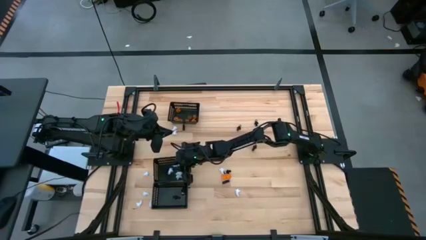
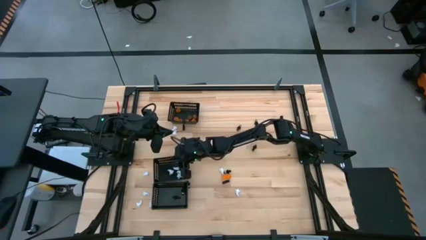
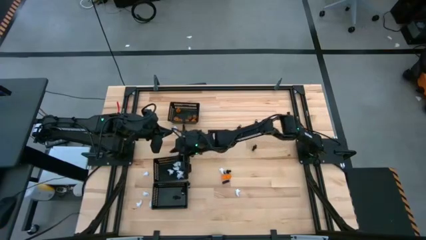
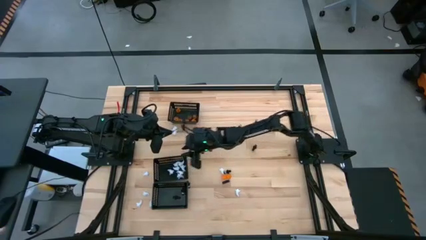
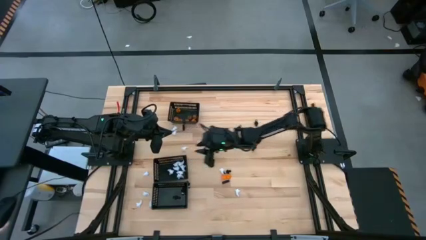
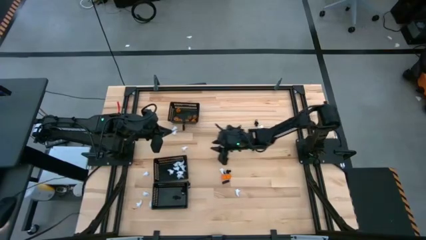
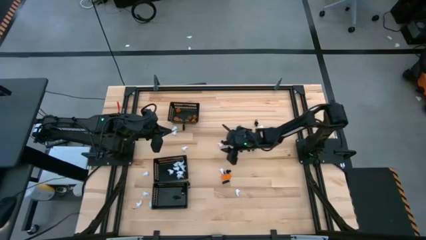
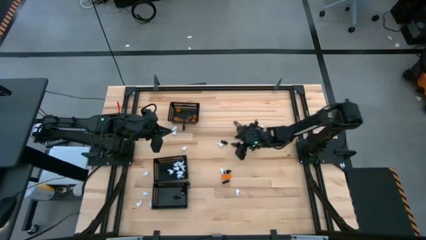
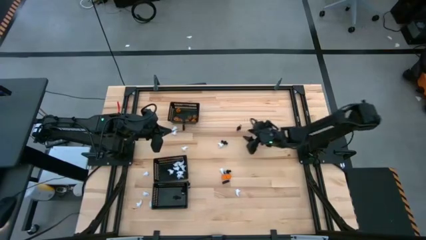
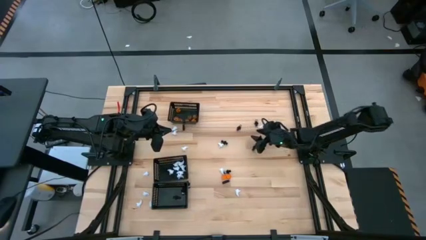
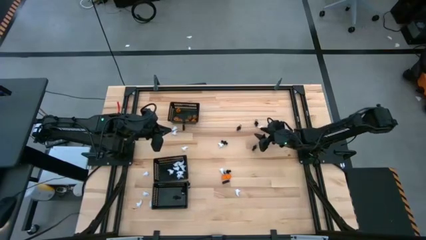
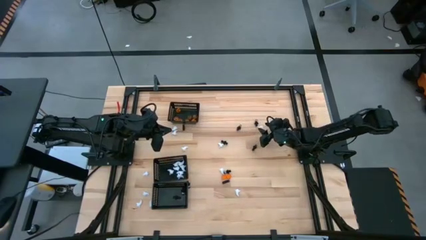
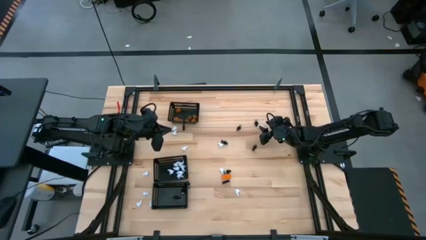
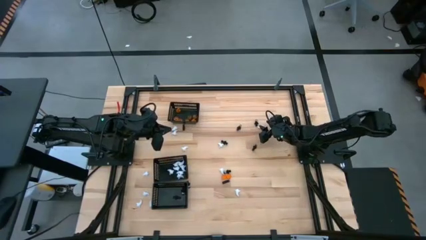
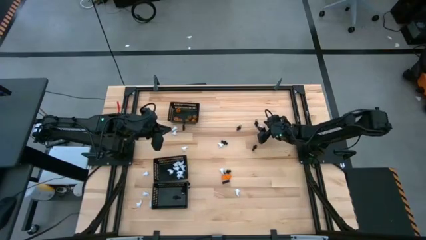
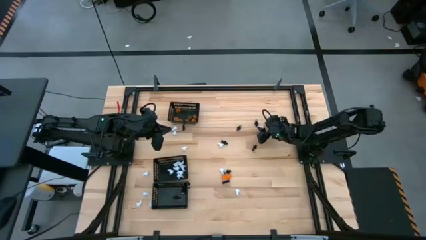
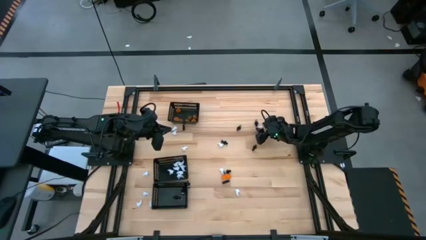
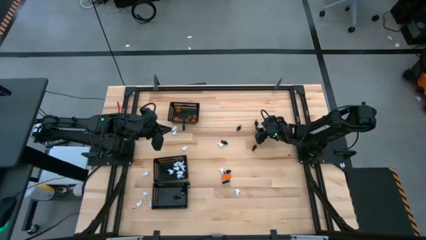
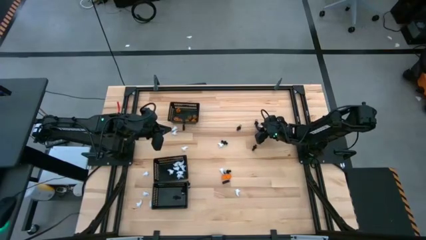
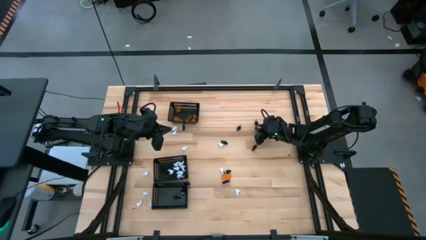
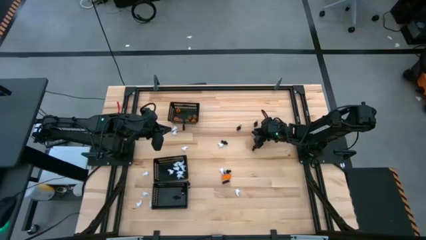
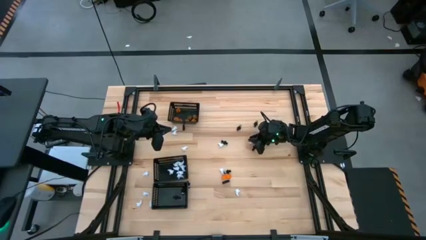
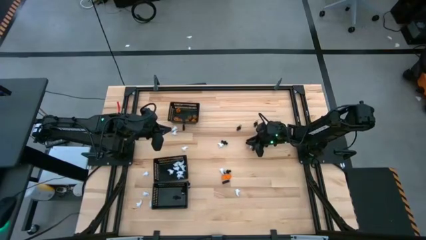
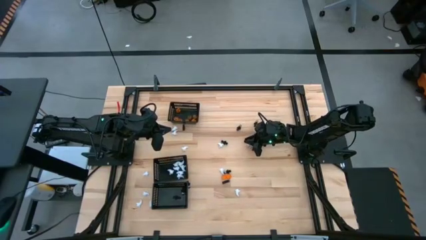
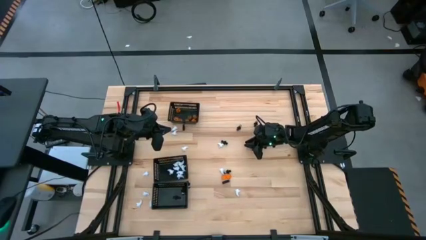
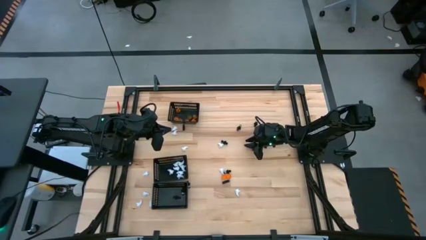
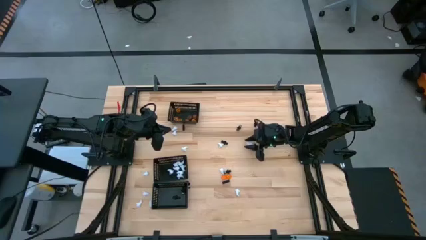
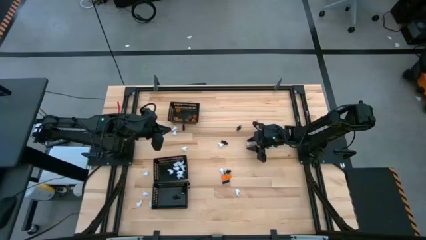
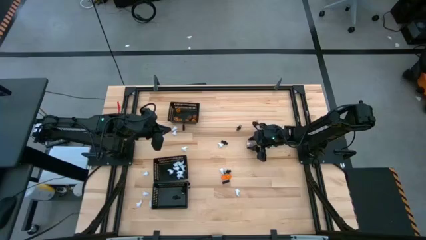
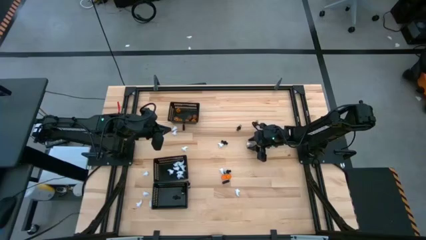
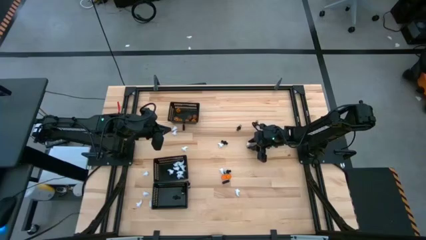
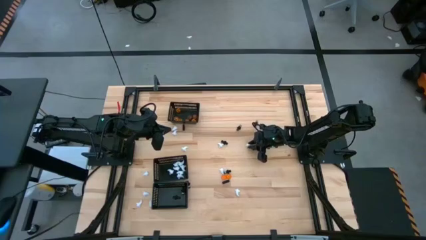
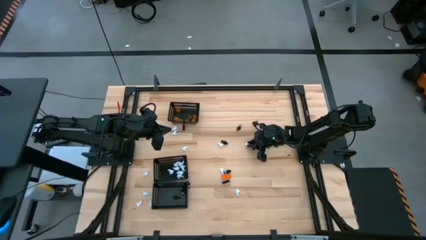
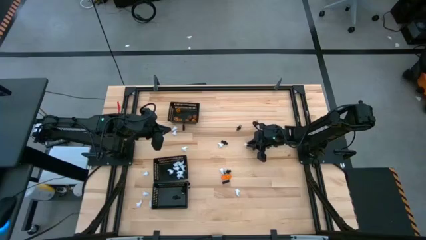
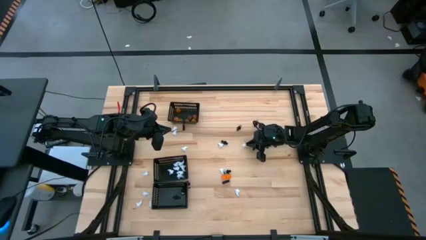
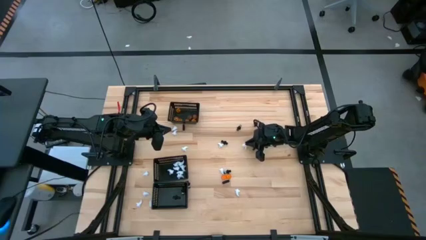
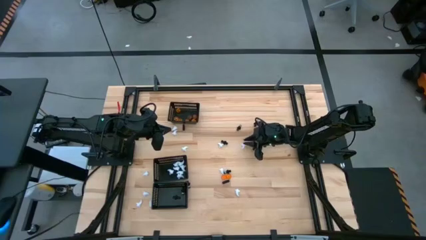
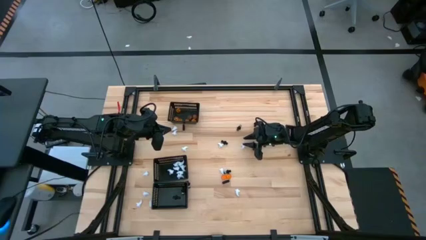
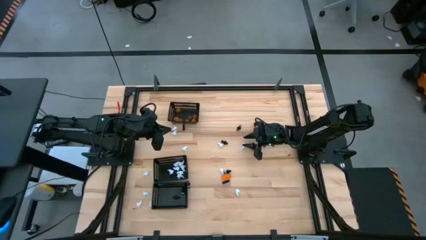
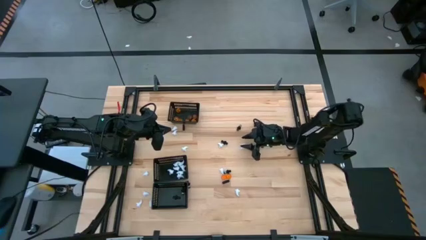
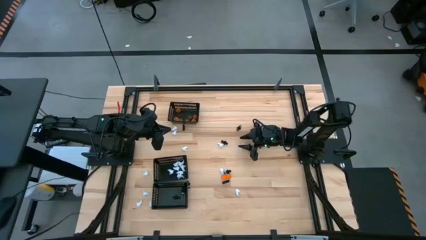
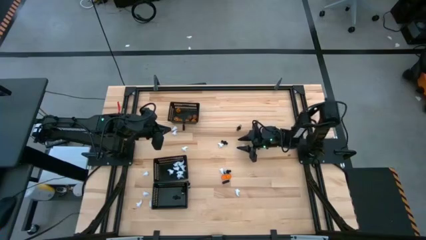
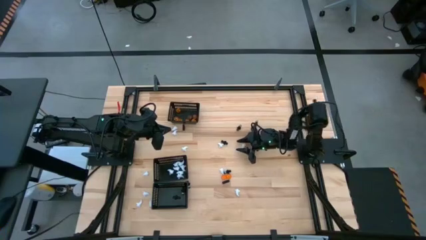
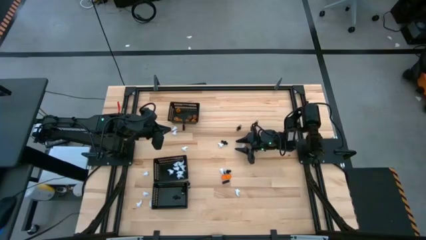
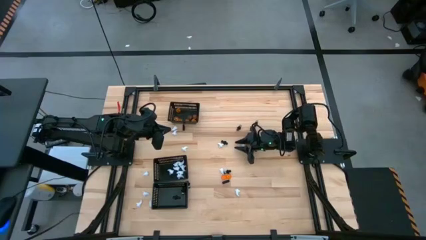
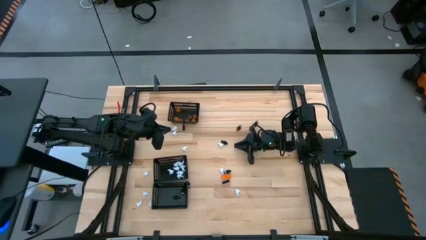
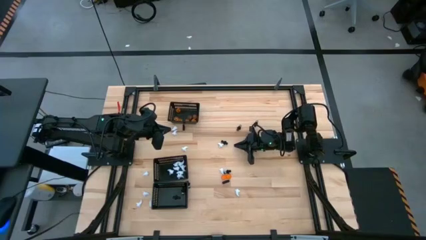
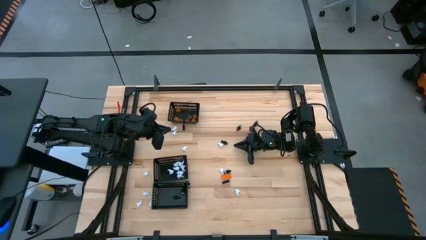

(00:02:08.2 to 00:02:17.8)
Task: Sort Halloween decoration
Put the white toy into the middle black bin

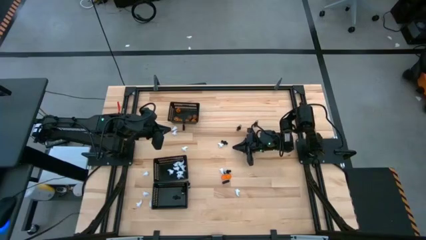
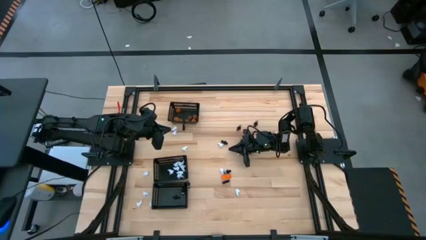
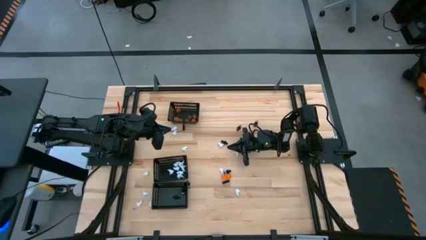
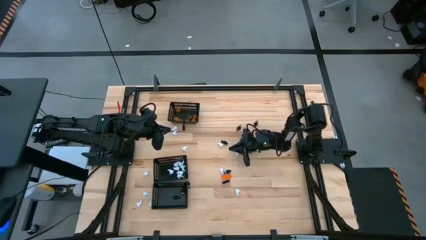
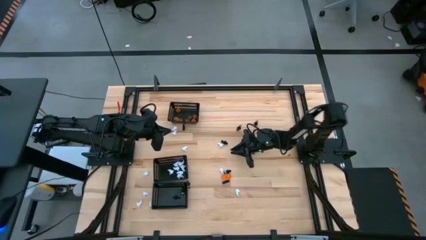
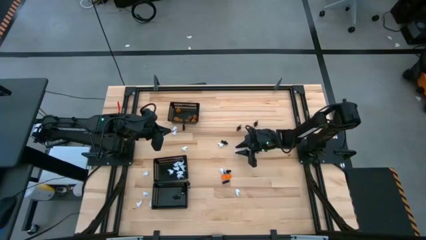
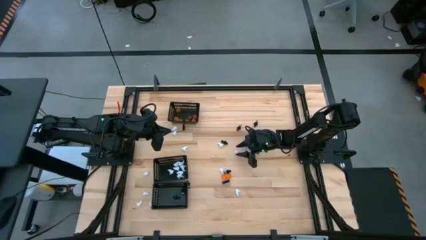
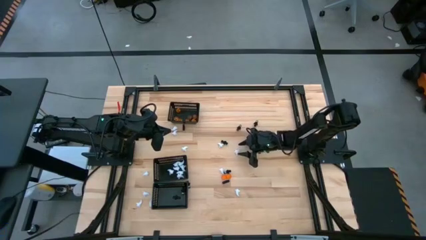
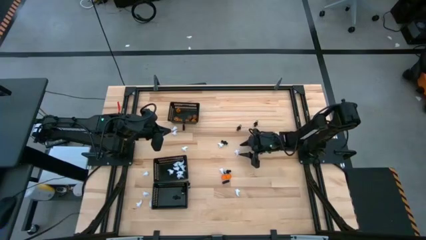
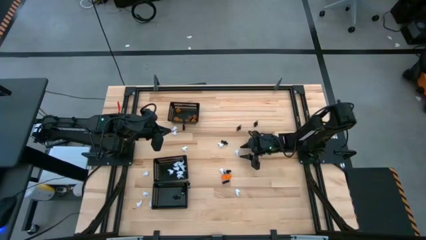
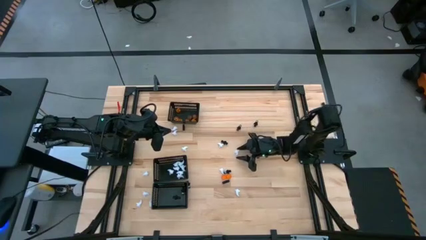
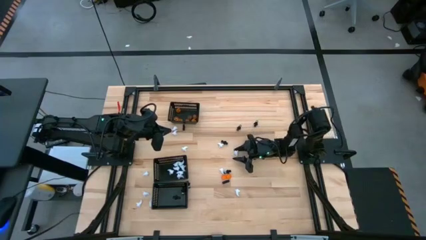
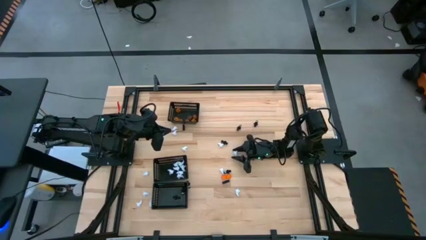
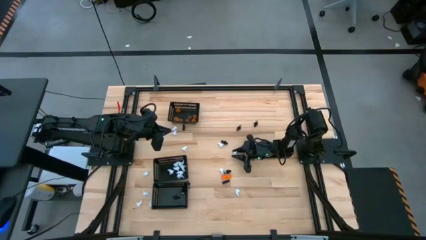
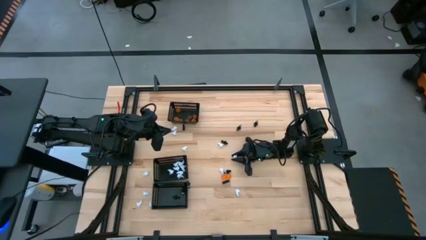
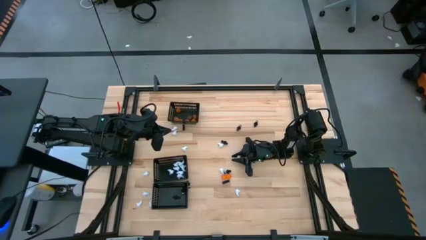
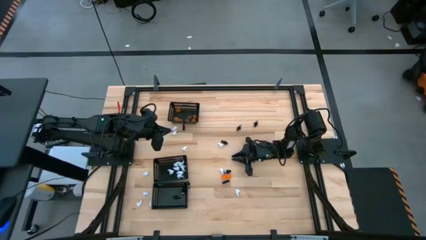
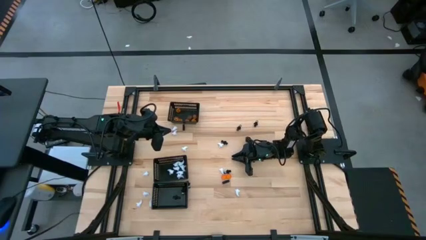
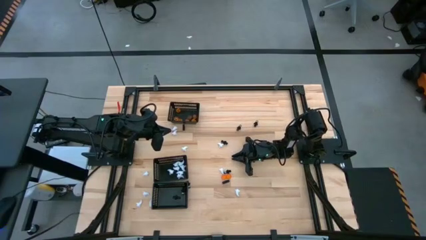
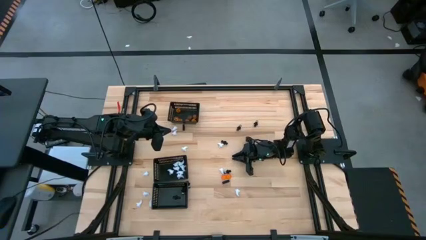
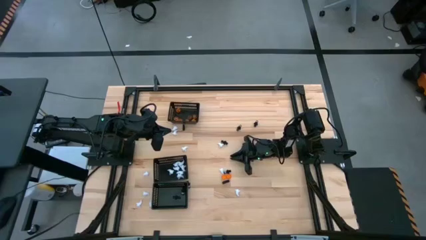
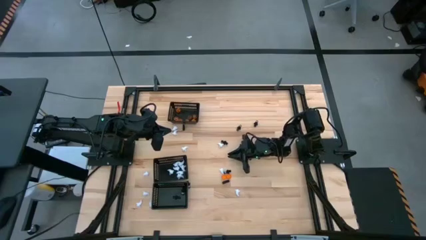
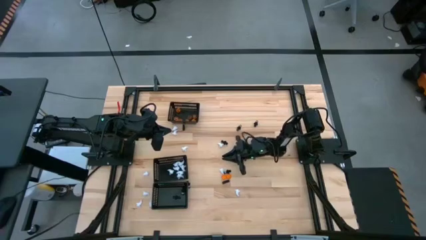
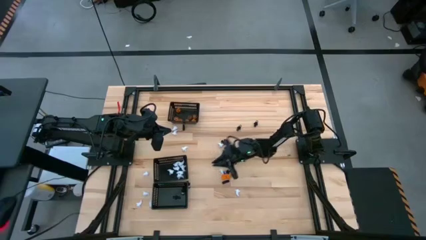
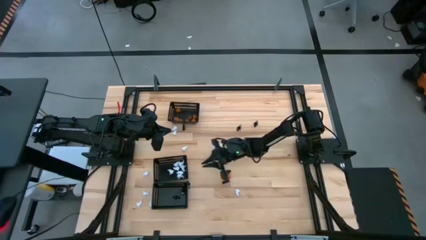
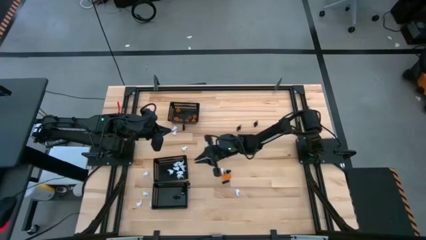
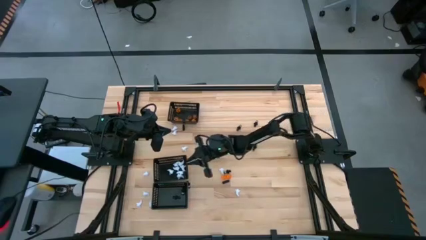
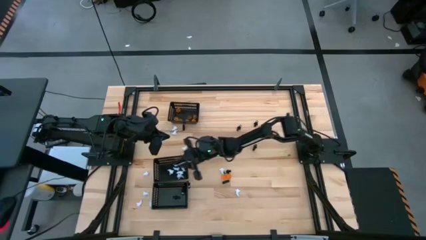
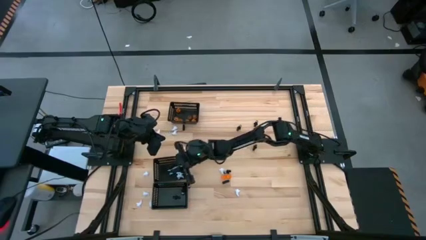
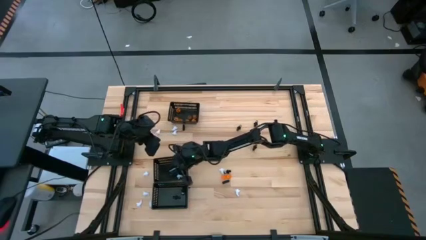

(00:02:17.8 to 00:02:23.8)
Put the white toy into the middle black bin
